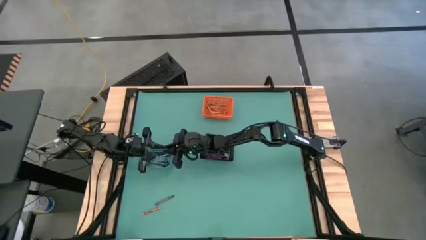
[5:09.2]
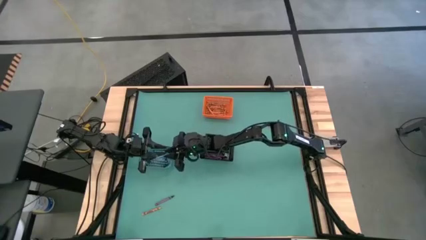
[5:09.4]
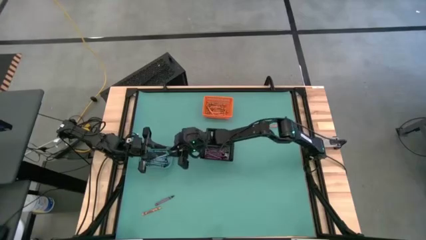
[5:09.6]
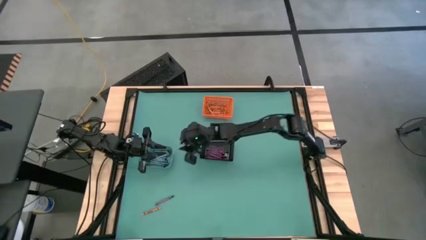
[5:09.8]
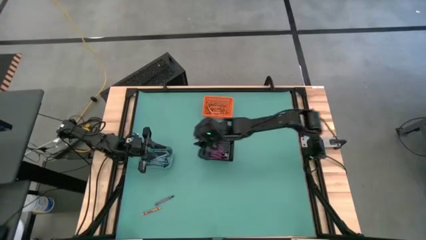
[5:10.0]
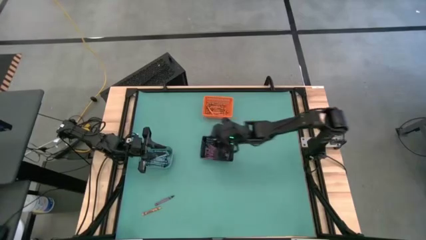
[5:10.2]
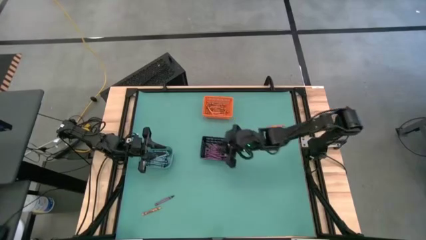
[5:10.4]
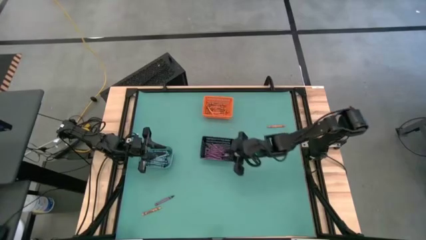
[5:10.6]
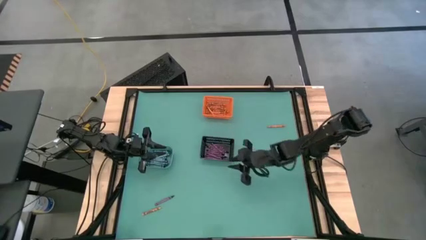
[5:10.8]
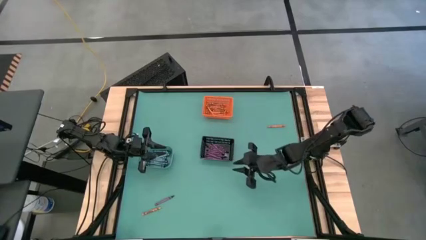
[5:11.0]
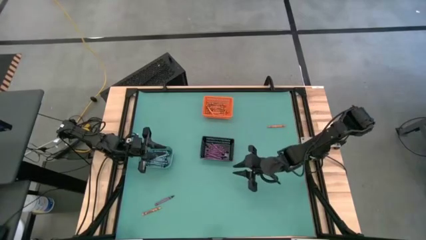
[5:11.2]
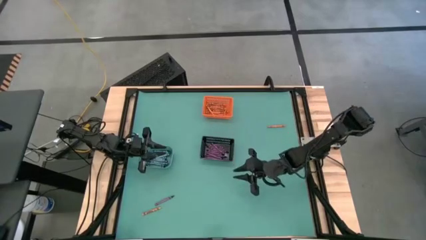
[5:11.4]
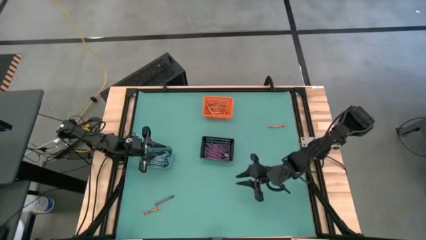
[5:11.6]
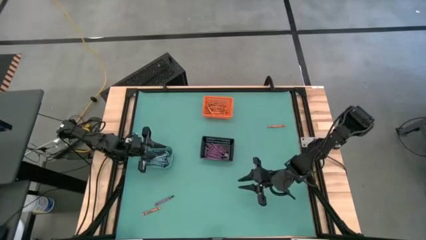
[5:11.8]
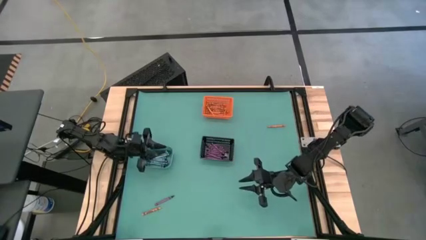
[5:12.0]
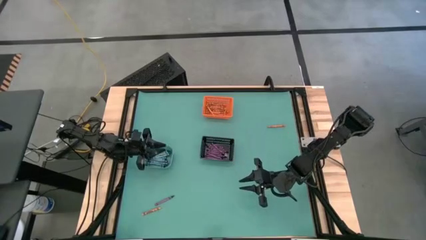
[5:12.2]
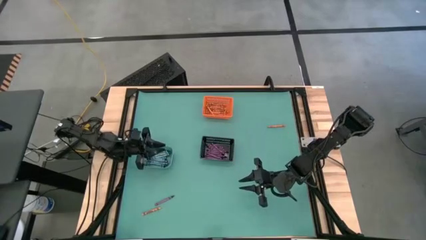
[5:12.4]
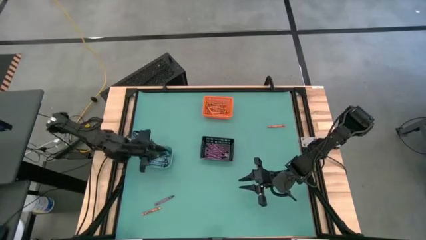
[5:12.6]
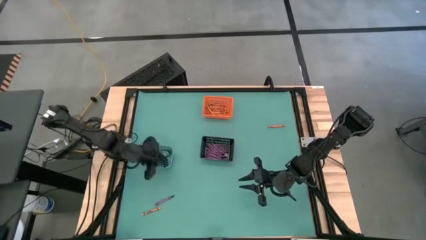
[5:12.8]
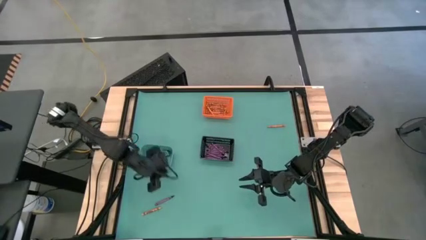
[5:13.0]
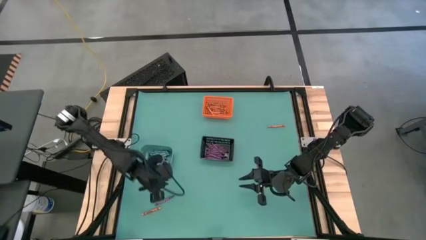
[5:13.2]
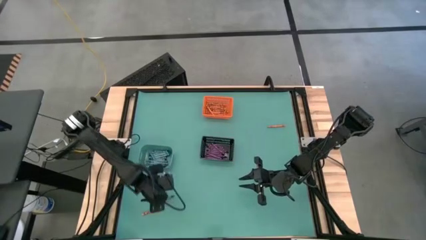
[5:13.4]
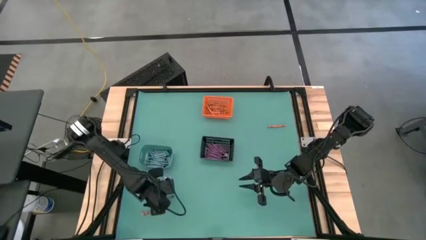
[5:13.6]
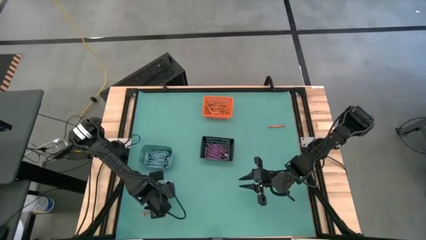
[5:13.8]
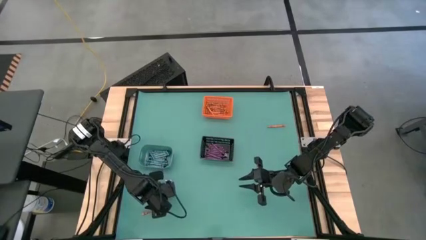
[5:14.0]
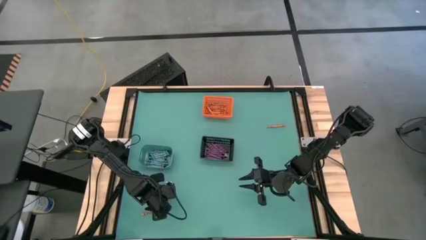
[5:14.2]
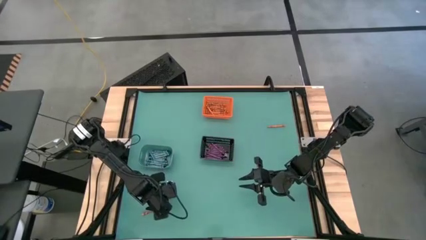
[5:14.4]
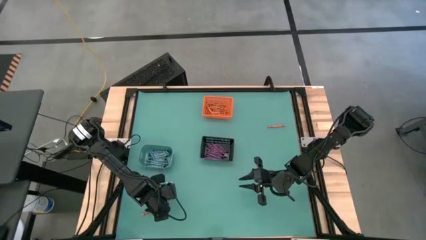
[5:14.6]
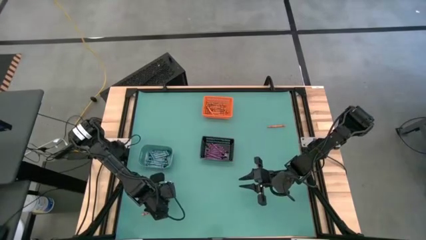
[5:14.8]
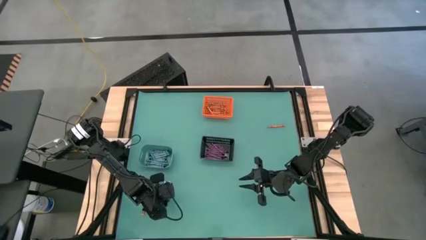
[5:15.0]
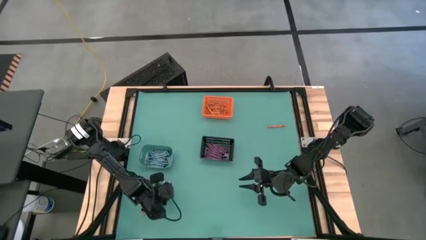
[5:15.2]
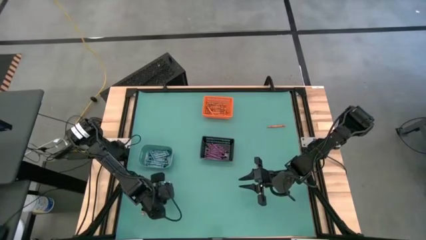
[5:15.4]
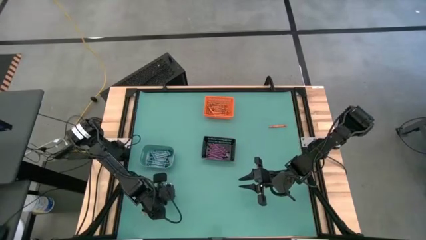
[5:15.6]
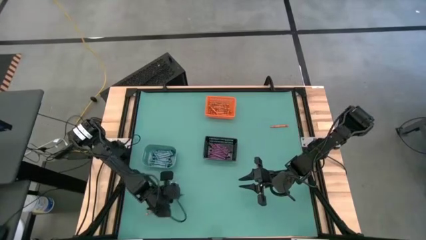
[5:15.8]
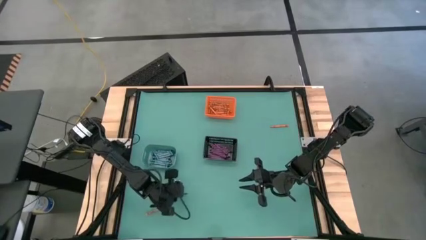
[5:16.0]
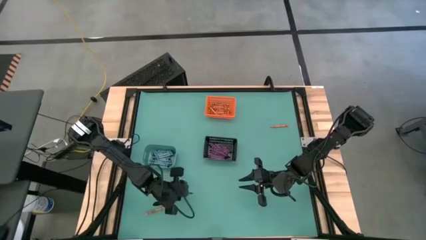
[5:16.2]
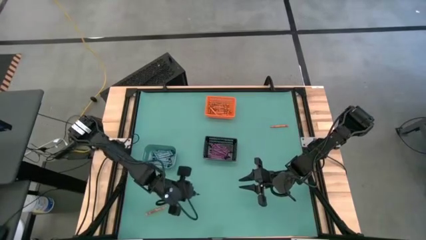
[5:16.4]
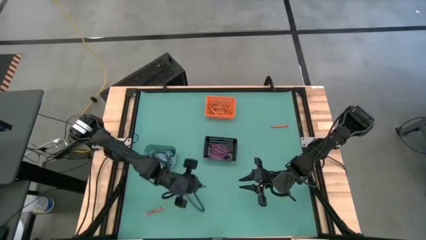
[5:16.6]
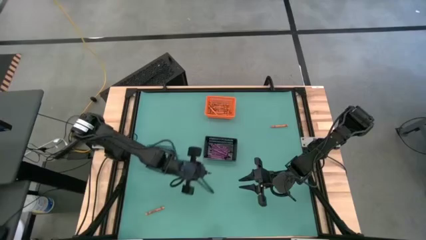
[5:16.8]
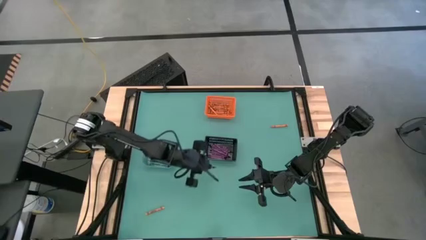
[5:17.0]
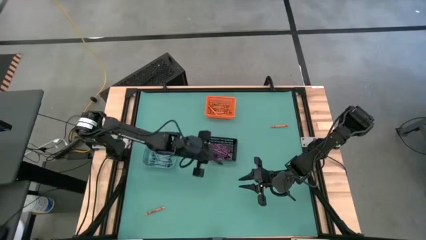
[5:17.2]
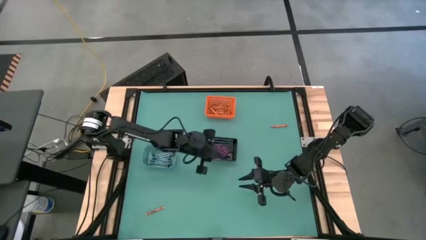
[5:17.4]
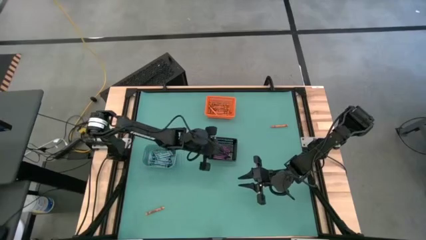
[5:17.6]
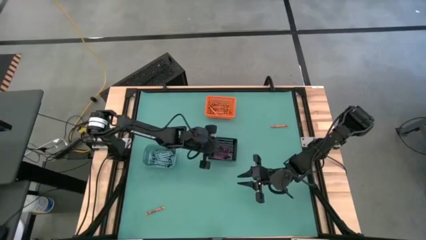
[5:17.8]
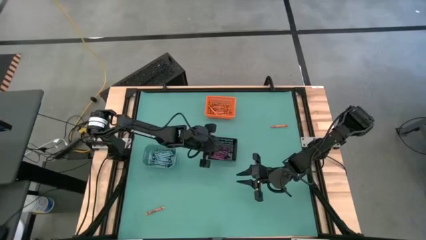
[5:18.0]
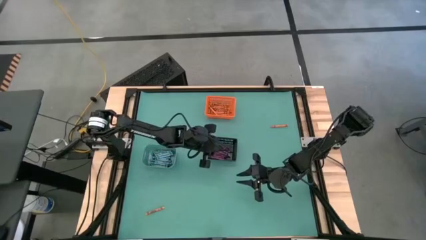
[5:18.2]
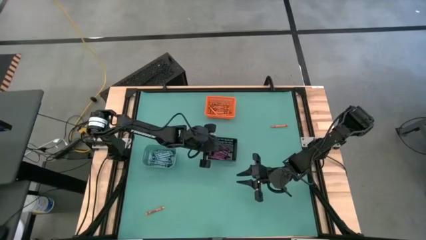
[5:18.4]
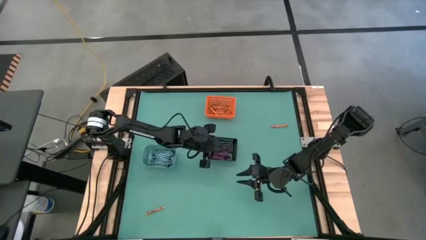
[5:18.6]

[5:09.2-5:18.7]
Task: Sort crayons
Put the violet crayon into the black bin

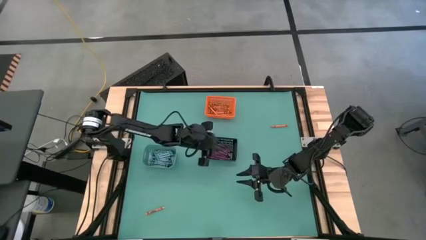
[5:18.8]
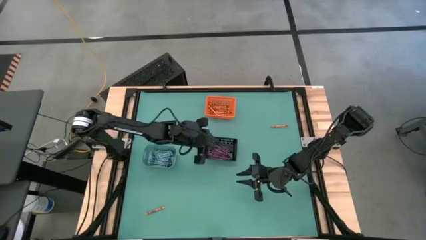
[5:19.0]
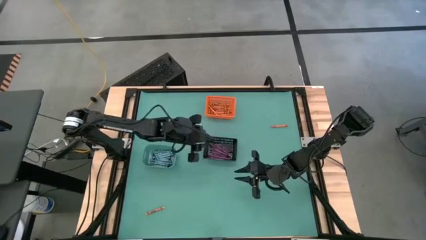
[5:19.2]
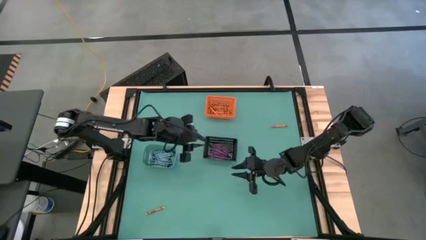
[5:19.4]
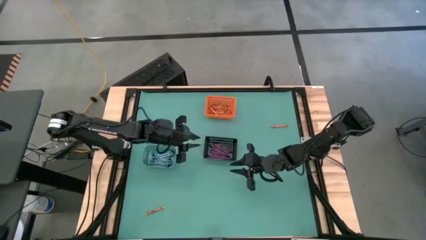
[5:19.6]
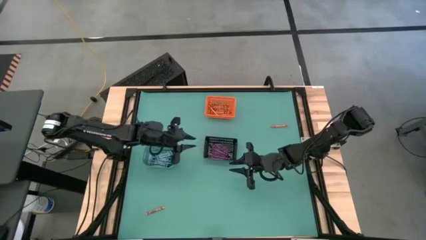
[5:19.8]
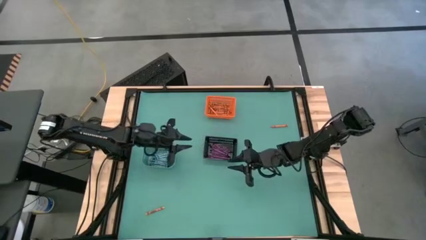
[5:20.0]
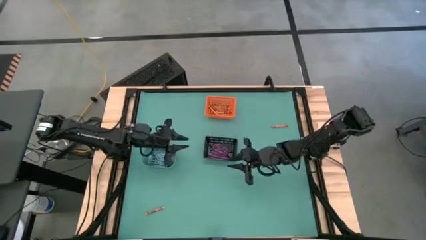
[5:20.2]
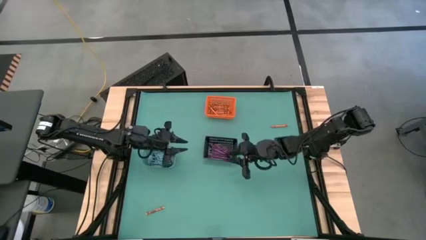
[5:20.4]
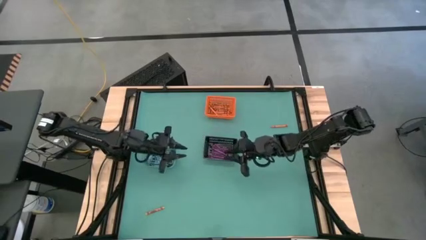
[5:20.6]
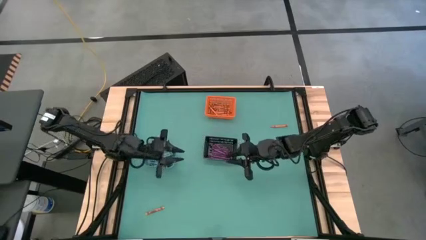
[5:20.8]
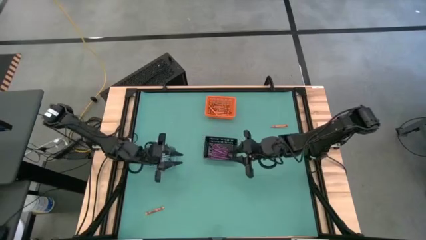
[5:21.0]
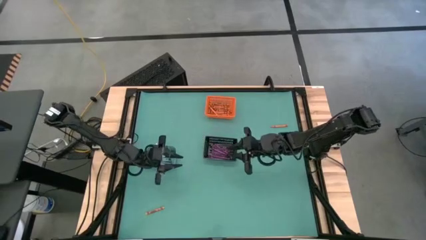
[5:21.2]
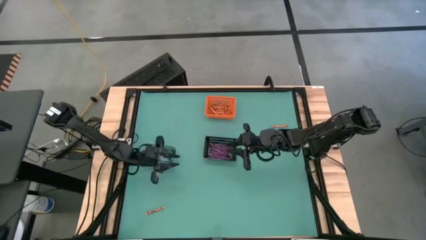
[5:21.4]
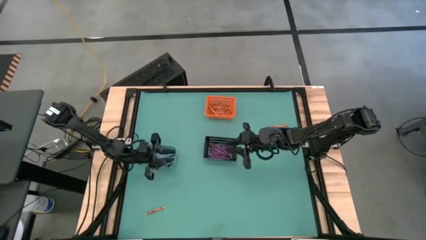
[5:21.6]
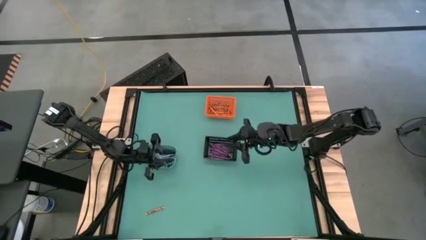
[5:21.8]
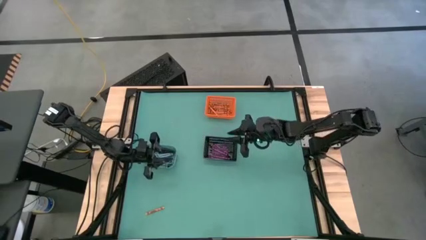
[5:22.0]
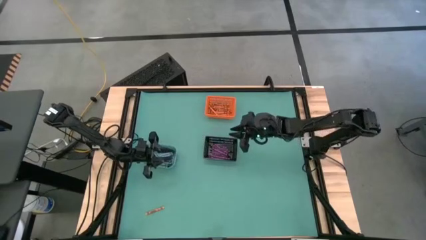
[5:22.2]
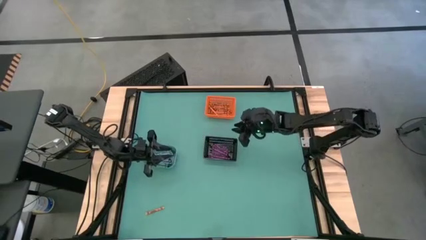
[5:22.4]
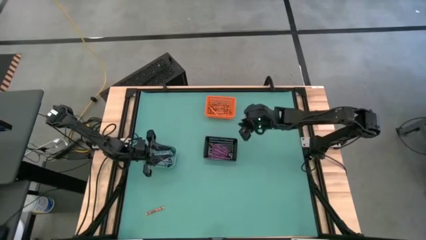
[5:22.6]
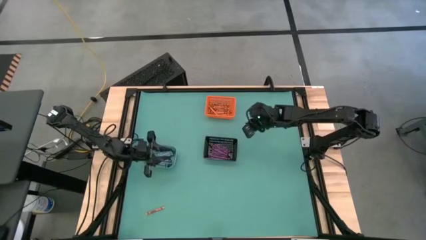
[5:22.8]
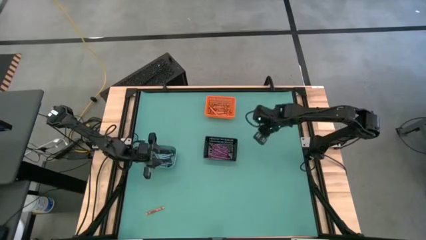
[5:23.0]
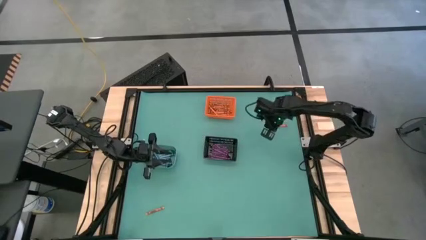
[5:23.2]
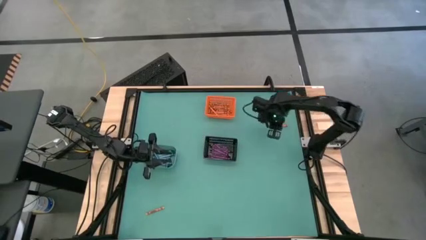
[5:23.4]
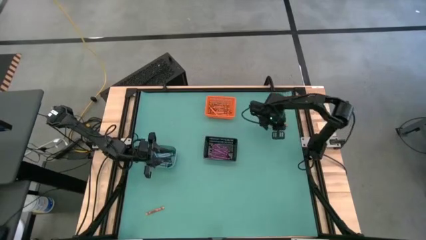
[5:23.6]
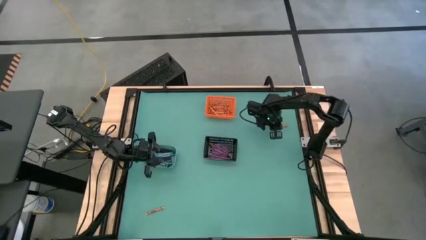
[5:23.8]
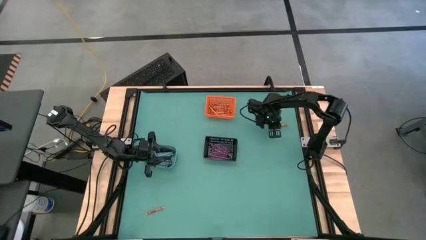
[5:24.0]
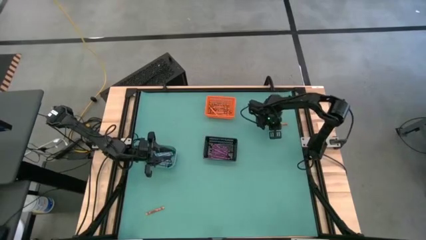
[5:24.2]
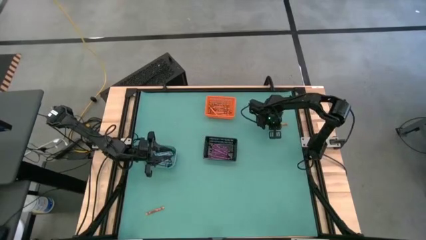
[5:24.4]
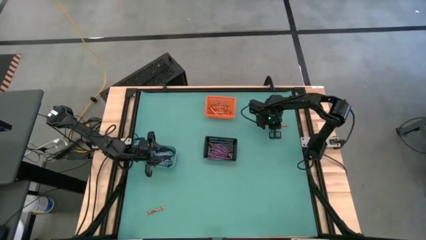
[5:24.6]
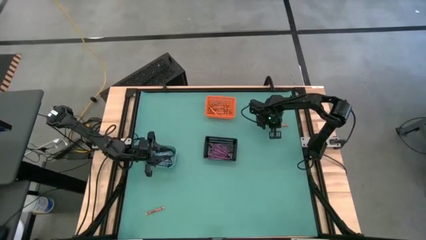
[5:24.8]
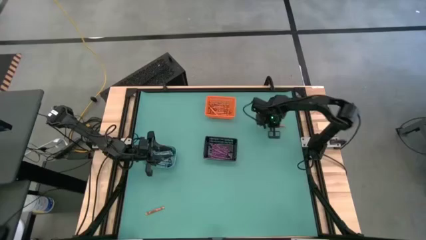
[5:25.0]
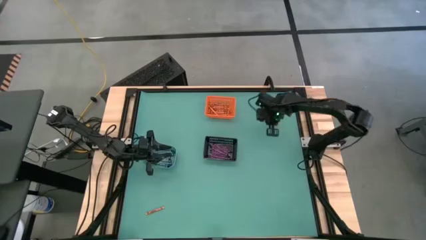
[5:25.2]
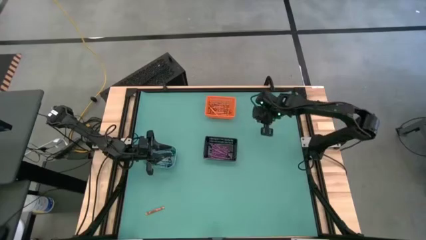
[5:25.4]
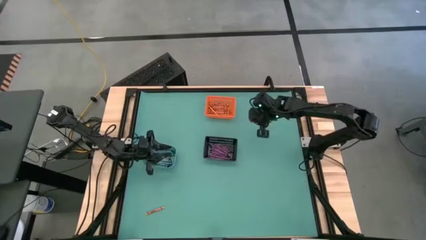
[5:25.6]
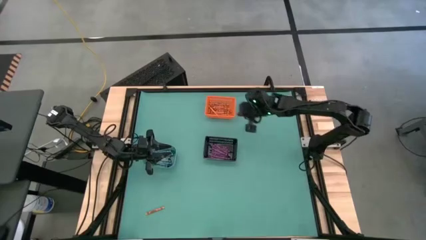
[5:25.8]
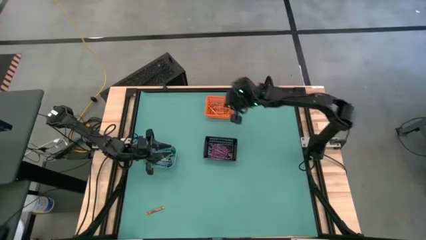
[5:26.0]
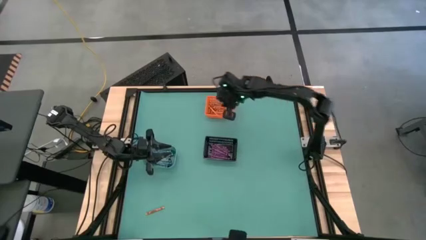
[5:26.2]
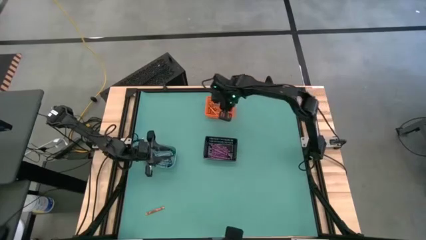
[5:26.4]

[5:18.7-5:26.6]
Put the orange crayon into the orange bin
